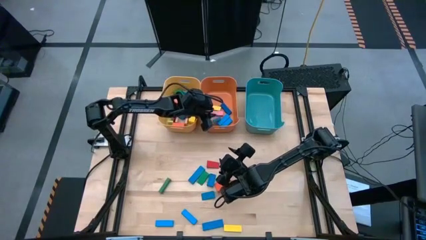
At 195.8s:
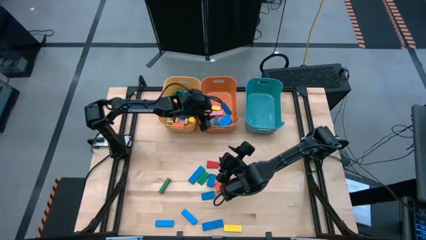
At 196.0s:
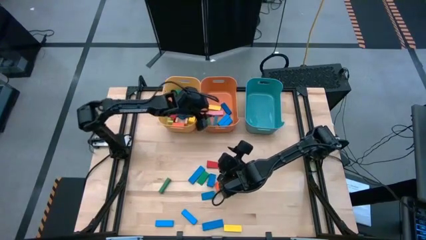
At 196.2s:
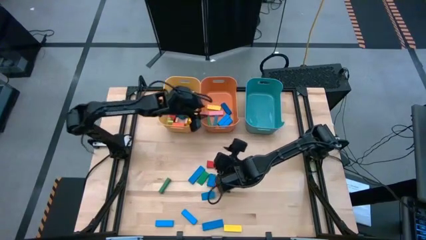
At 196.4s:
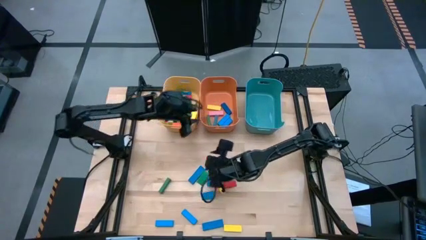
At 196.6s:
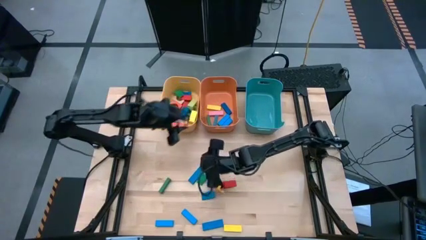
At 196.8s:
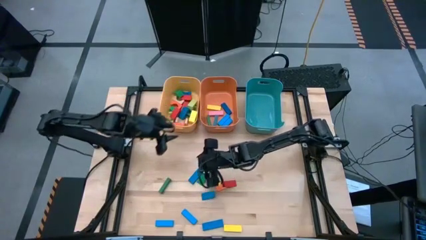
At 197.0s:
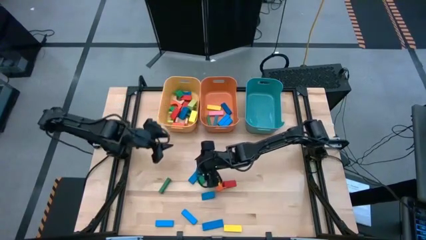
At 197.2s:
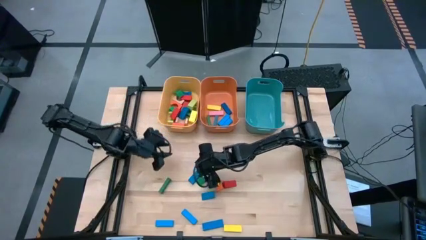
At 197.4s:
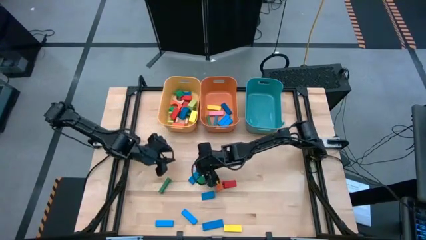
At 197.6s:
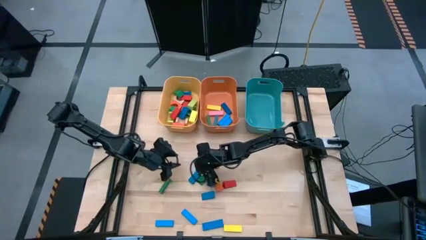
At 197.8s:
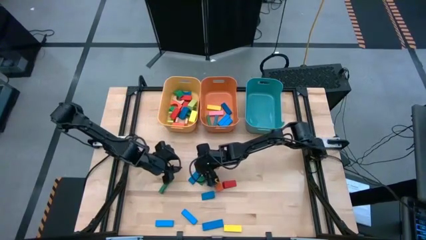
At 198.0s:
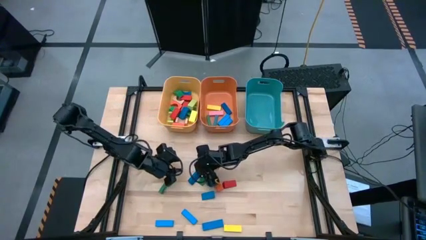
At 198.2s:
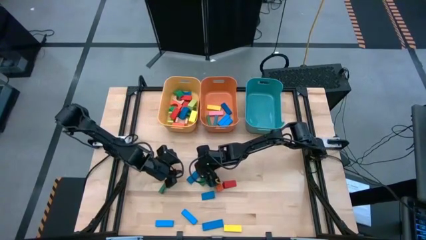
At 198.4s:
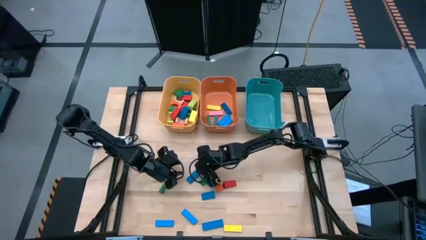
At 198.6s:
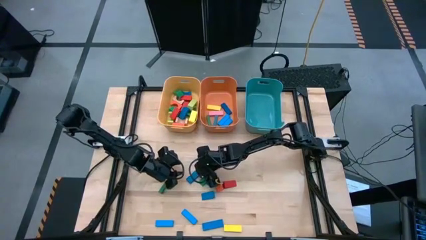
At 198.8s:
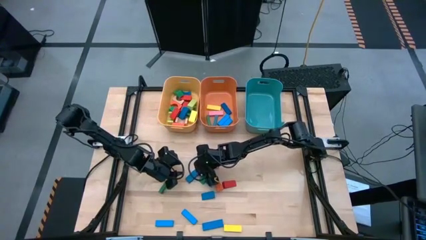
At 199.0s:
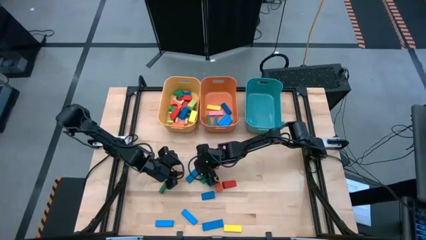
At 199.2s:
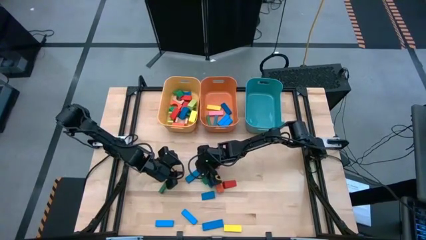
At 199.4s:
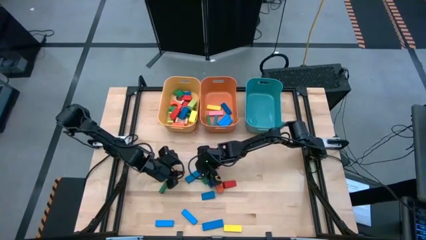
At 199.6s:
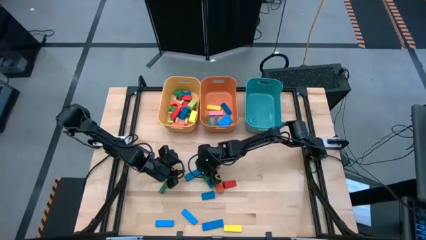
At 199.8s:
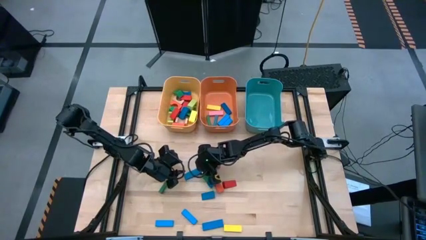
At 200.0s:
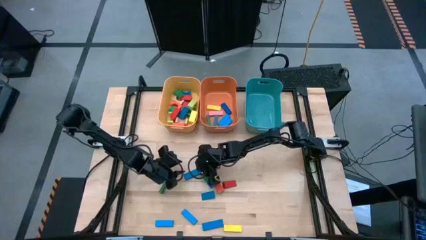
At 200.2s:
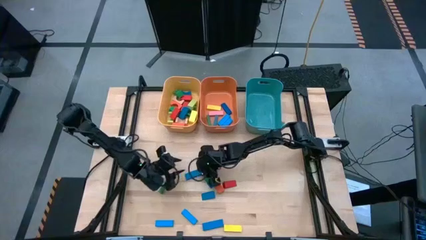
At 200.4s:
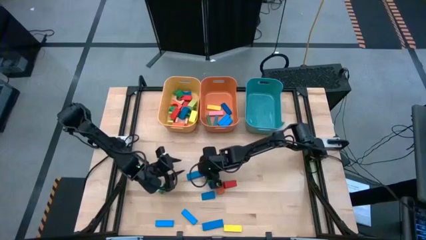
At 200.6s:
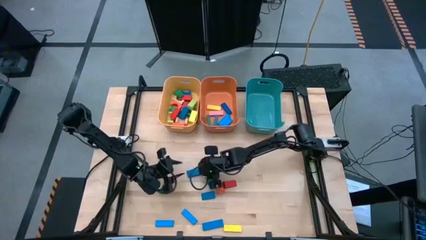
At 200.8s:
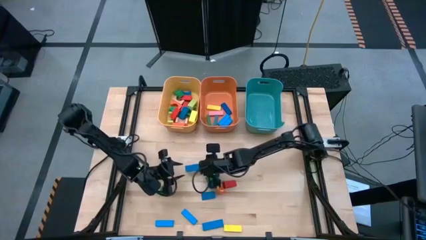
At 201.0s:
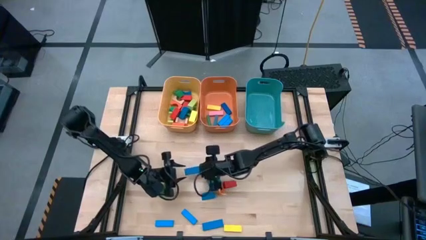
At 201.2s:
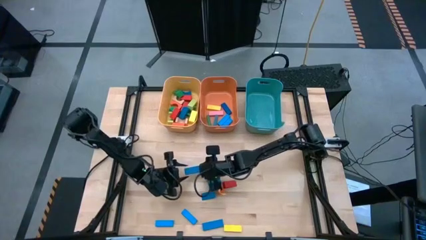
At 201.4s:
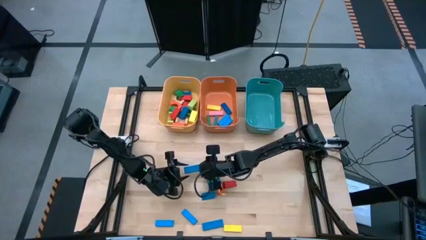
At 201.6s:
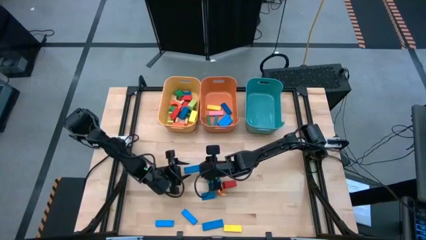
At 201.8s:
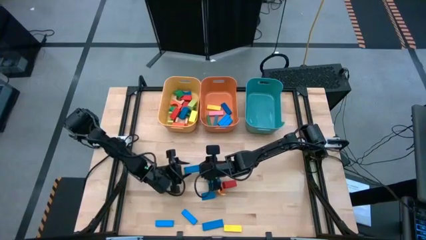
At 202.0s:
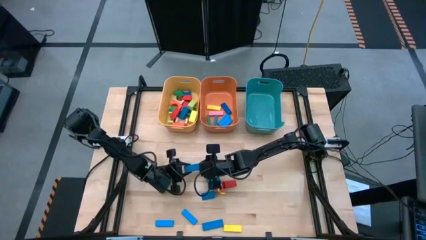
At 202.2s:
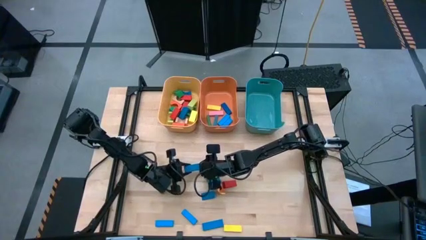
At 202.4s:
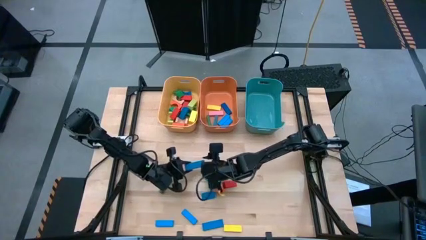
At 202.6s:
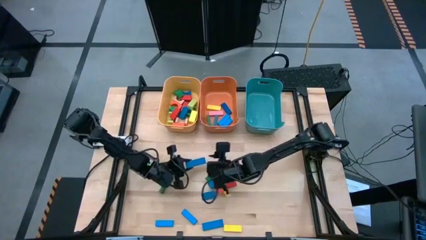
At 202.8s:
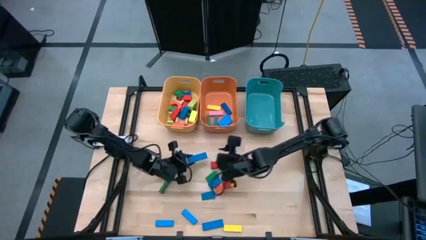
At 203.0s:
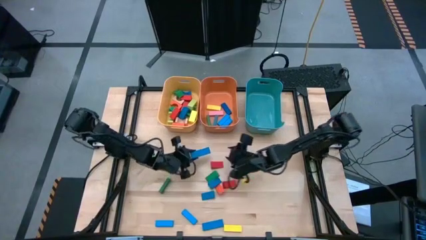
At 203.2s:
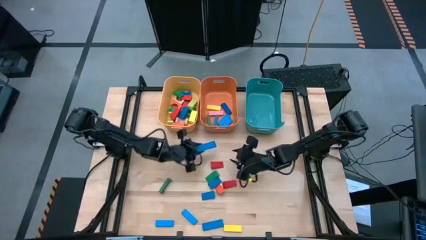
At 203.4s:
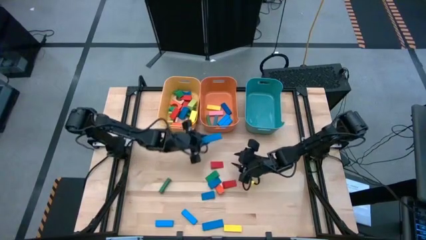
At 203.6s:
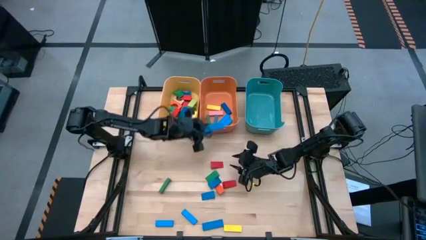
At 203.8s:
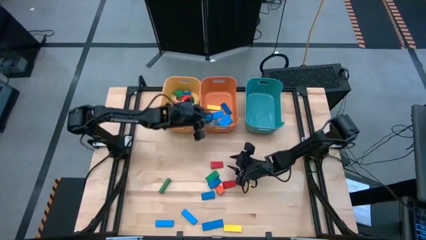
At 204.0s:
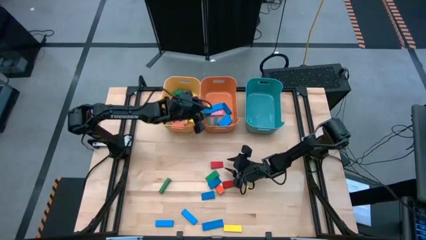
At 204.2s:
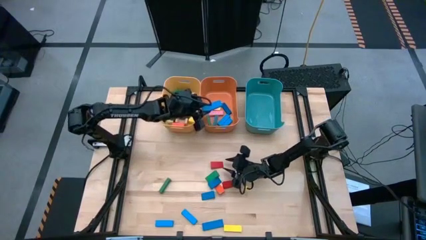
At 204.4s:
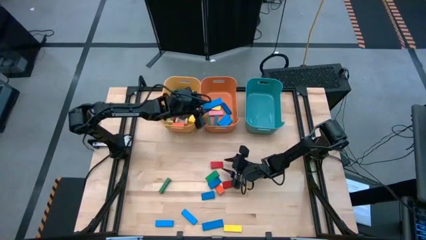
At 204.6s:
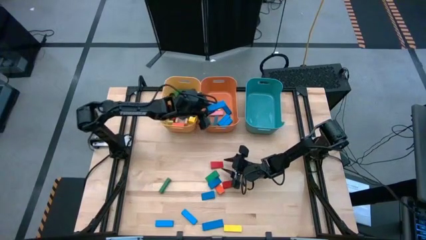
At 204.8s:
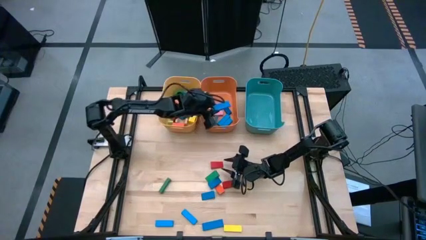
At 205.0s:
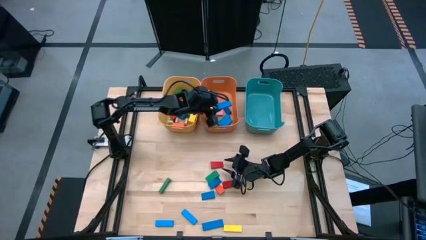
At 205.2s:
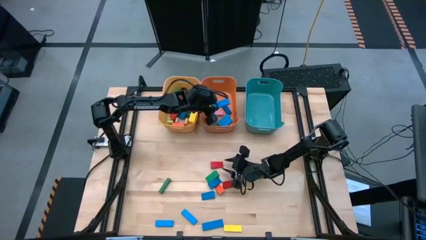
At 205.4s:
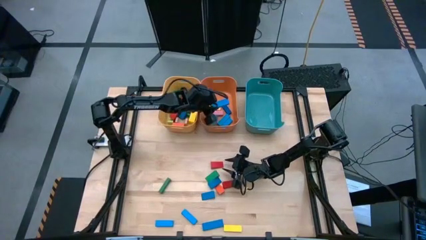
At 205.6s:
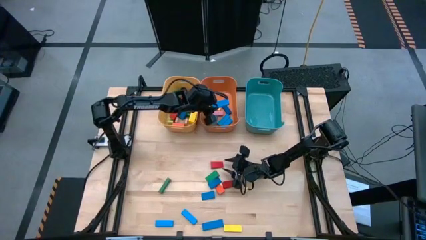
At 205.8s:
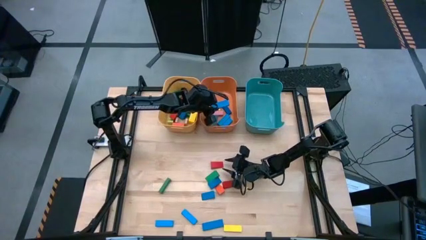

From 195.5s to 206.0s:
Task: Sort blocks by size
Put the blue rectangle block into the orange bin

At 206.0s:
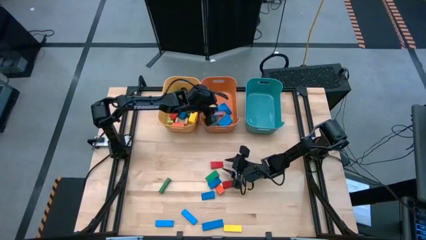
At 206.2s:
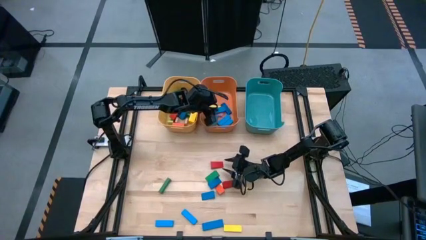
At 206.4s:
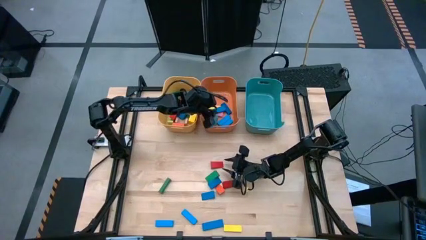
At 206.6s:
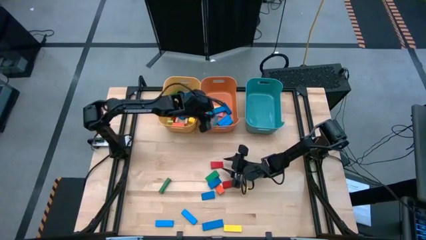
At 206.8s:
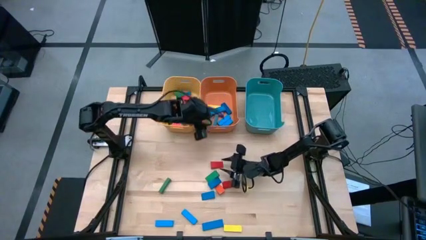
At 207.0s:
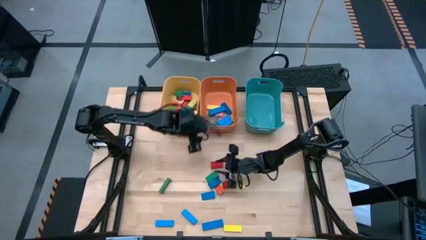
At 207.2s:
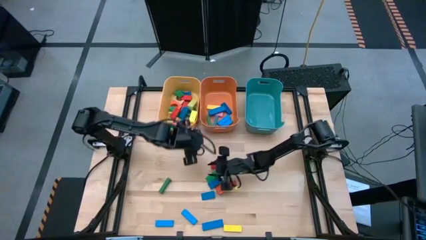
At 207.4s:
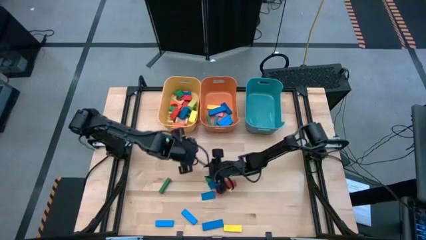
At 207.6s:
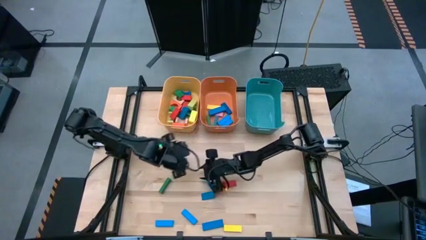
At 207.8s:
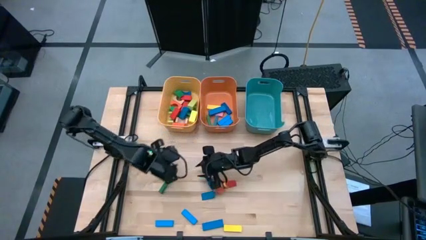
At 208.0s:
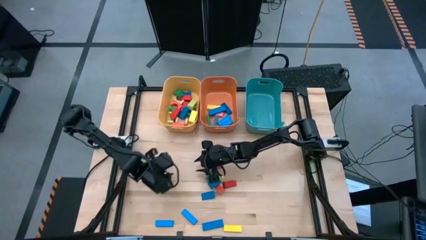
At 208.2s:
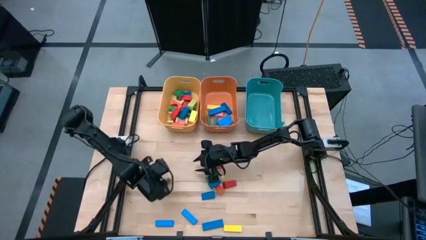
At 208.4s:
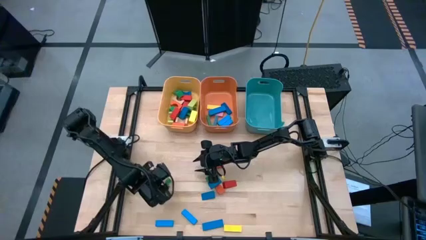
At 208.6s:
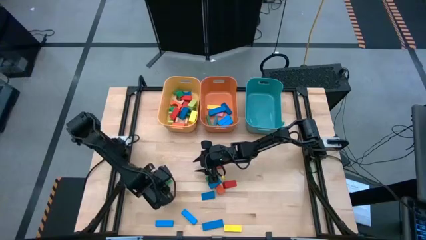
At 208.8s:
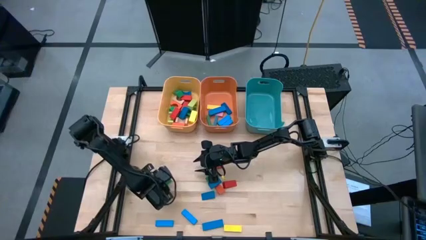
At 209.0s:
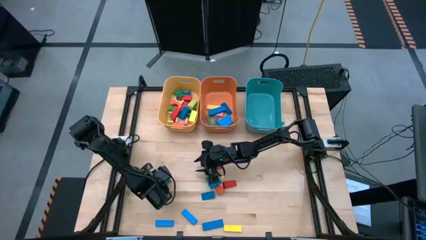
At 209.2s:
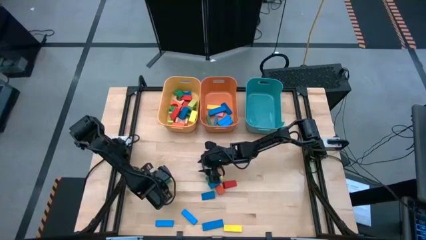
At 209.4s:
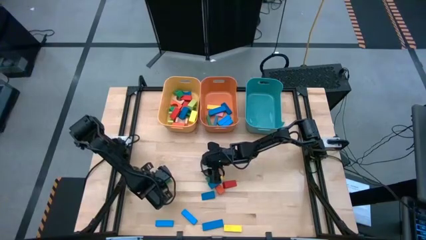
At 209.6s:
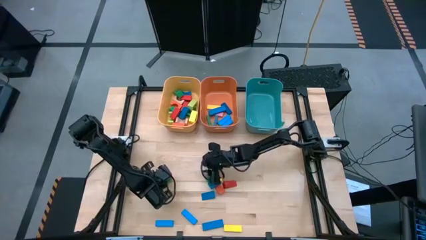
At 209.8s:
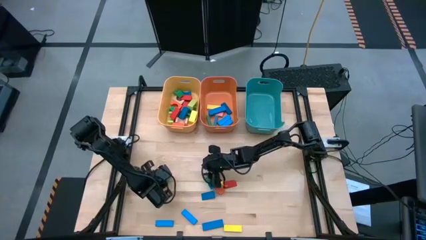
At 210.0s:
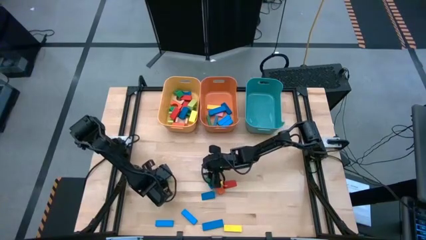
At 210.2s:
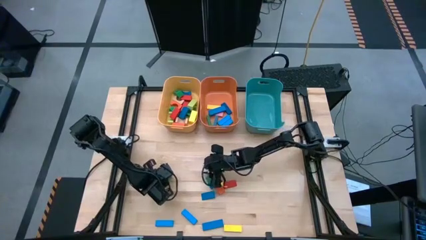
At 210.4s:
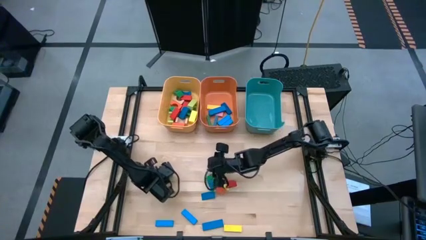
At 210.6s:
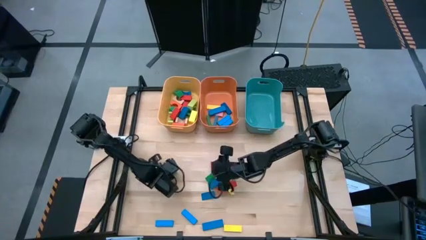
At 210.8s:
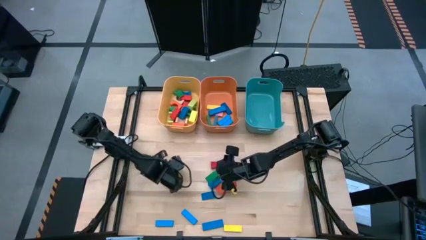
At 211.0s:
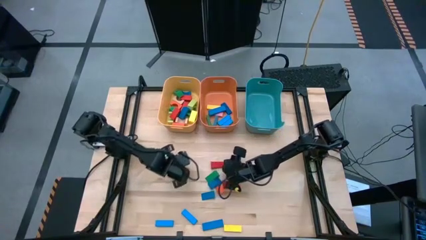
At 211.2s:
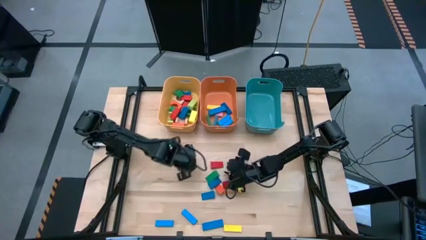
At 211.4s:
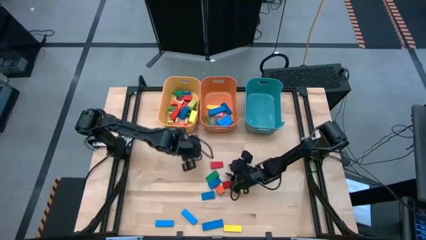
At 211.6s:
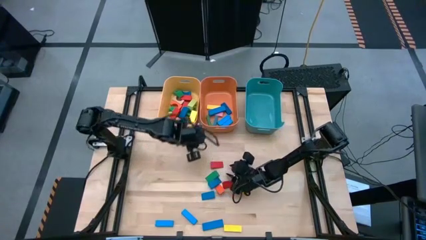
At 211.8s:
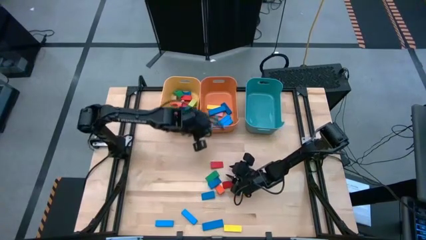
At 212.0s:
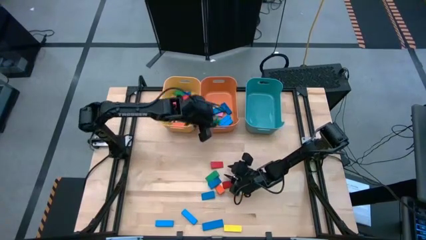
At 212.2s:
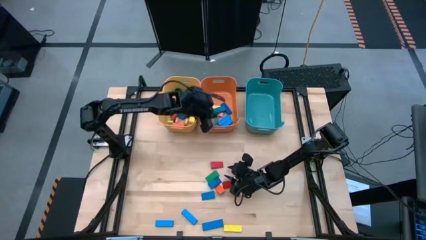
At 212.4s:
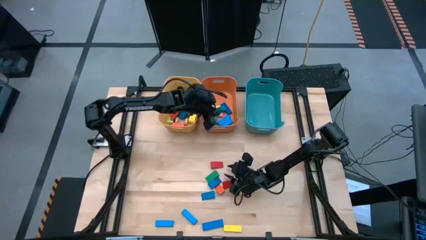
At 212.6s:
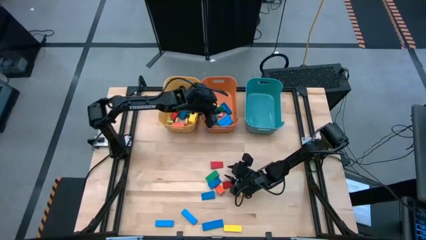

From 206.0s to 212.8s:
Put the green rectangle block into the orange bin
